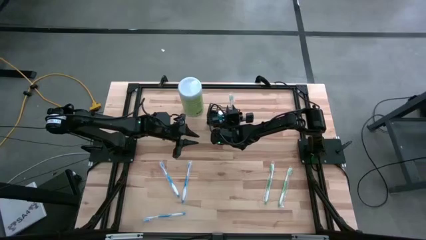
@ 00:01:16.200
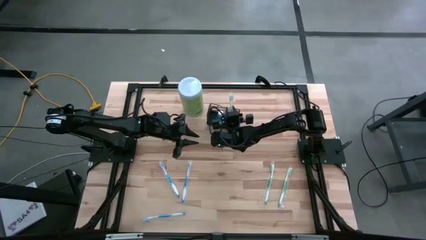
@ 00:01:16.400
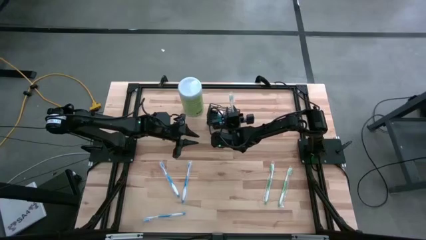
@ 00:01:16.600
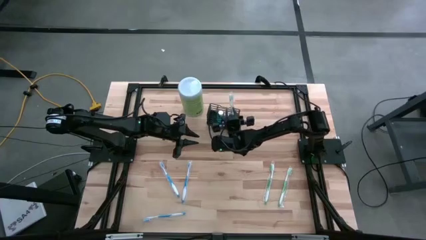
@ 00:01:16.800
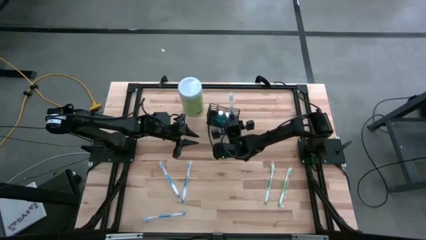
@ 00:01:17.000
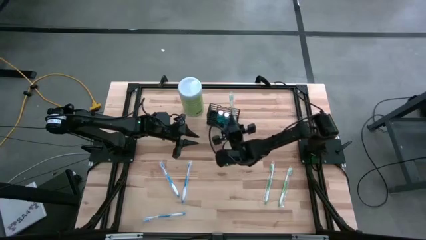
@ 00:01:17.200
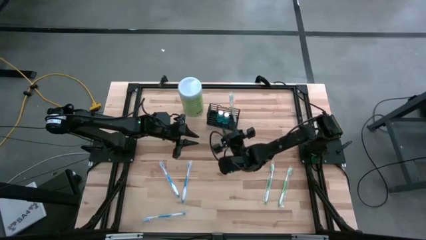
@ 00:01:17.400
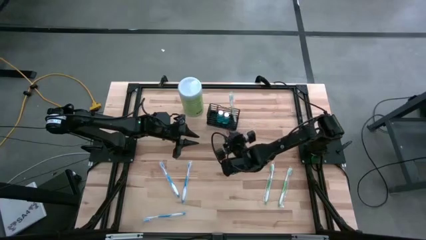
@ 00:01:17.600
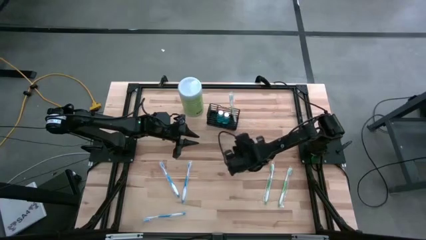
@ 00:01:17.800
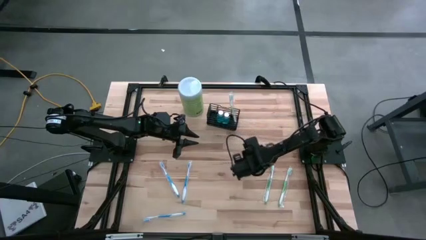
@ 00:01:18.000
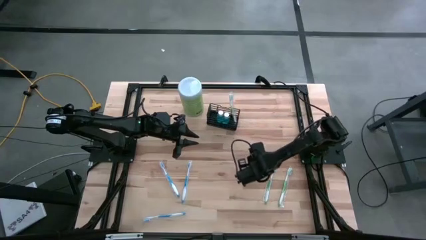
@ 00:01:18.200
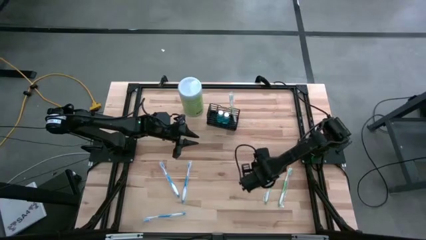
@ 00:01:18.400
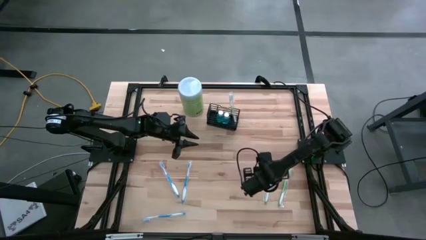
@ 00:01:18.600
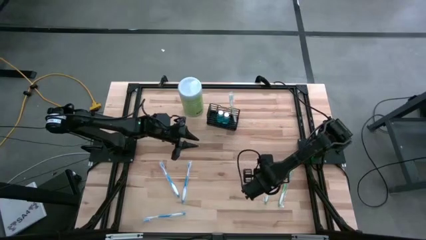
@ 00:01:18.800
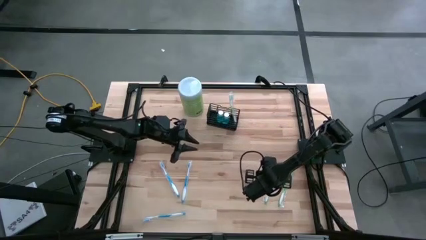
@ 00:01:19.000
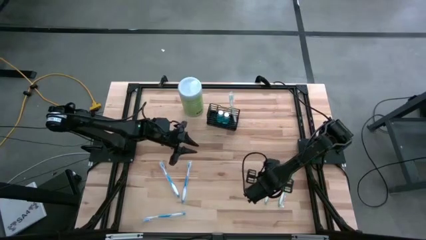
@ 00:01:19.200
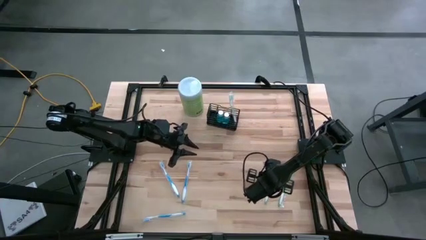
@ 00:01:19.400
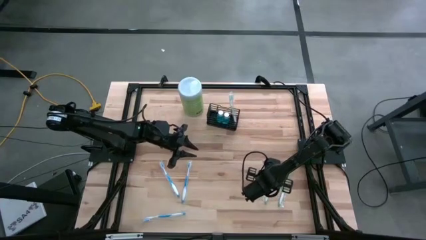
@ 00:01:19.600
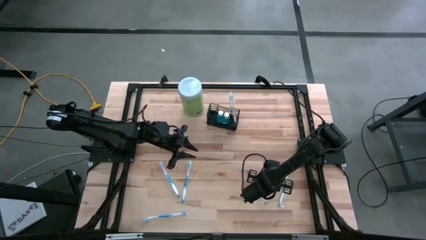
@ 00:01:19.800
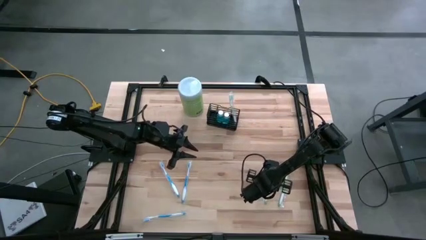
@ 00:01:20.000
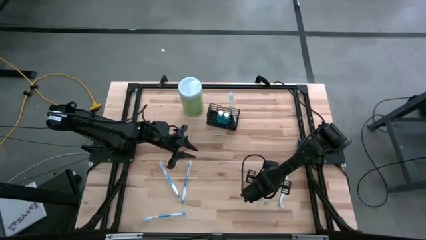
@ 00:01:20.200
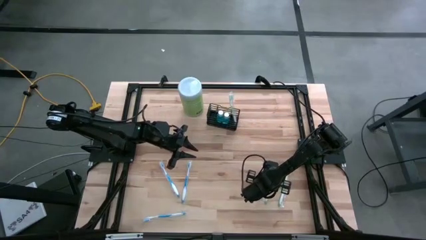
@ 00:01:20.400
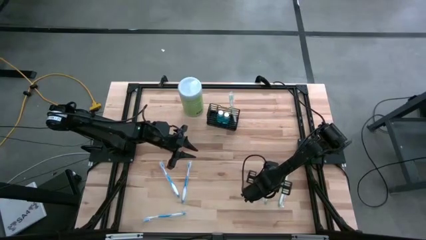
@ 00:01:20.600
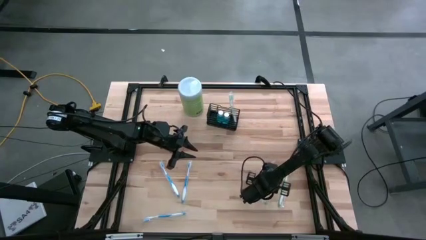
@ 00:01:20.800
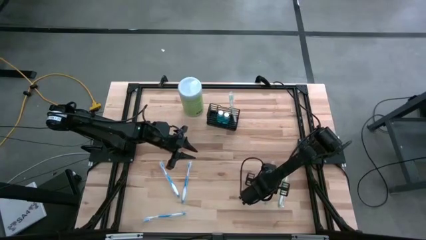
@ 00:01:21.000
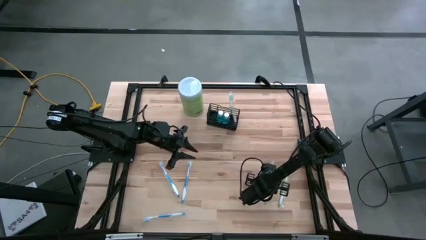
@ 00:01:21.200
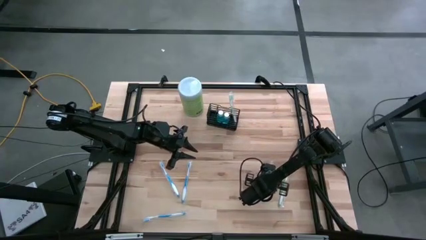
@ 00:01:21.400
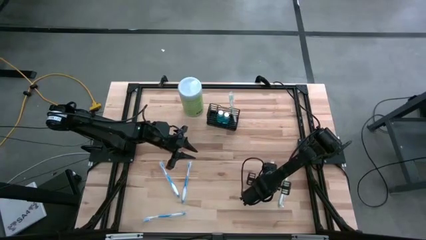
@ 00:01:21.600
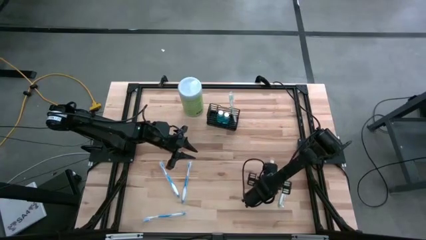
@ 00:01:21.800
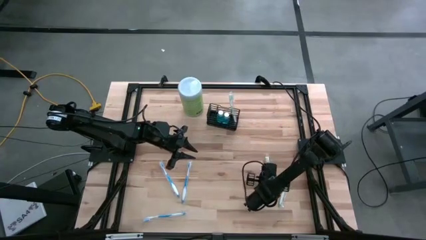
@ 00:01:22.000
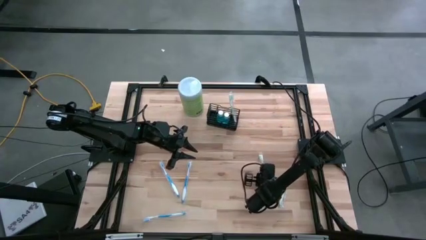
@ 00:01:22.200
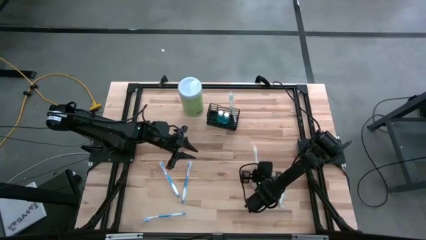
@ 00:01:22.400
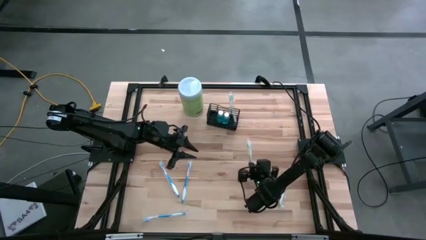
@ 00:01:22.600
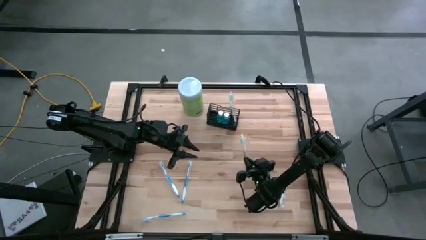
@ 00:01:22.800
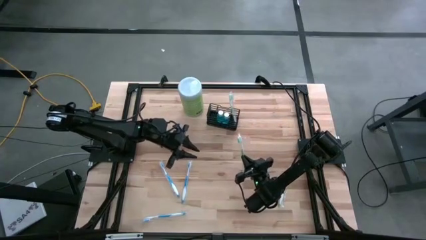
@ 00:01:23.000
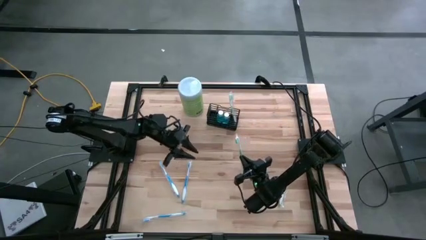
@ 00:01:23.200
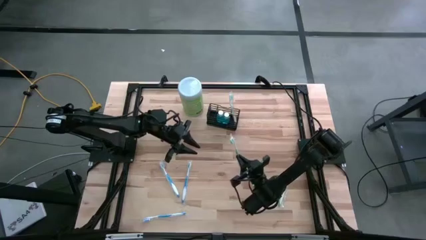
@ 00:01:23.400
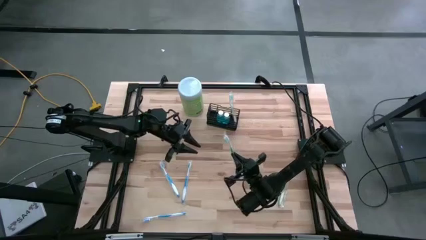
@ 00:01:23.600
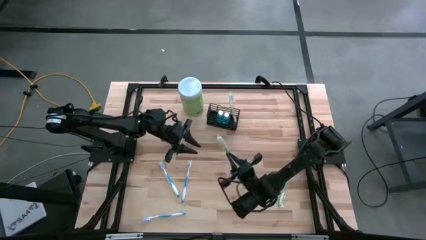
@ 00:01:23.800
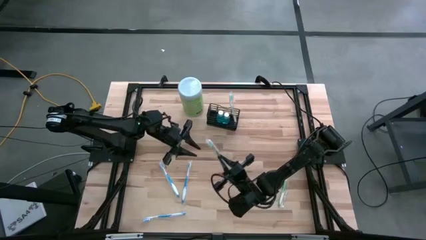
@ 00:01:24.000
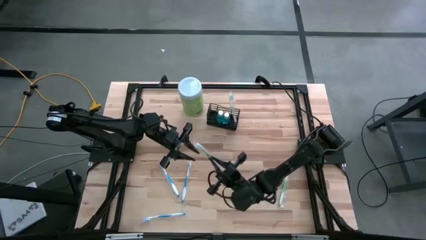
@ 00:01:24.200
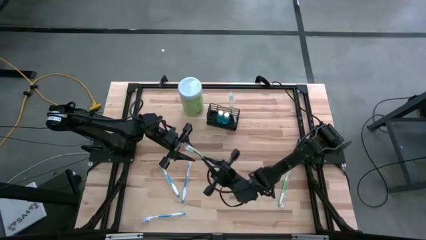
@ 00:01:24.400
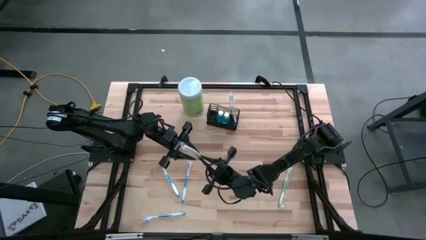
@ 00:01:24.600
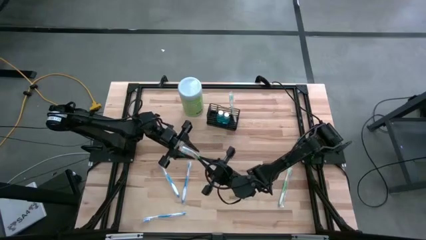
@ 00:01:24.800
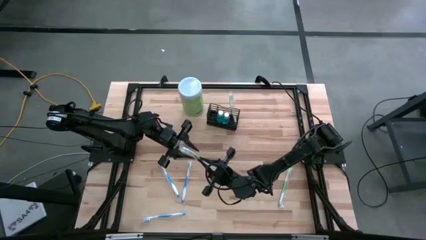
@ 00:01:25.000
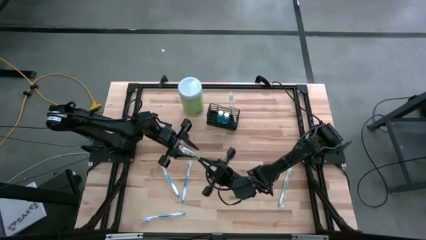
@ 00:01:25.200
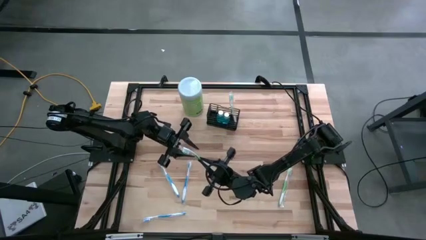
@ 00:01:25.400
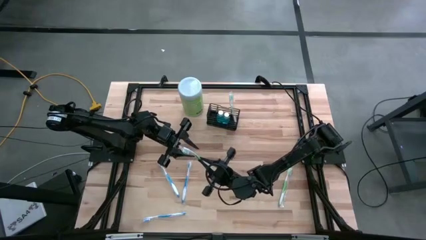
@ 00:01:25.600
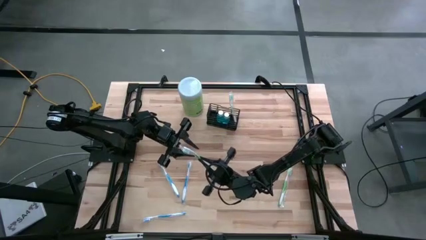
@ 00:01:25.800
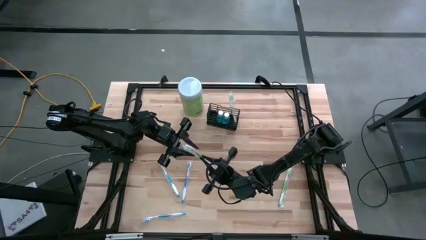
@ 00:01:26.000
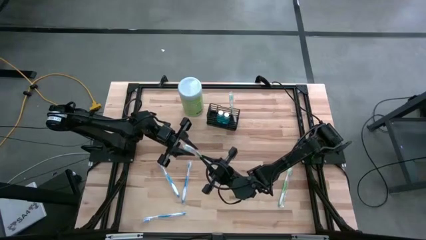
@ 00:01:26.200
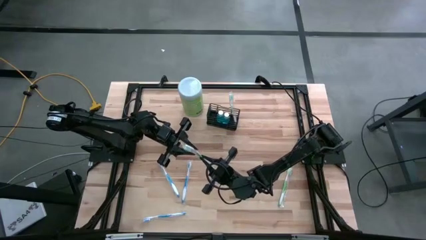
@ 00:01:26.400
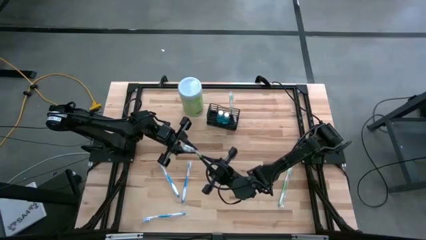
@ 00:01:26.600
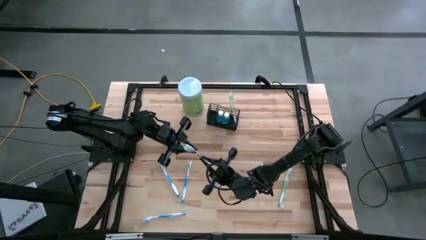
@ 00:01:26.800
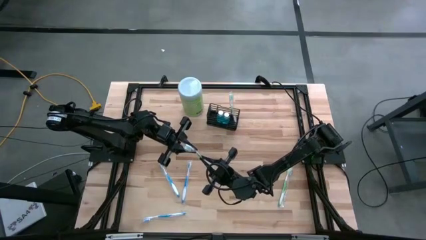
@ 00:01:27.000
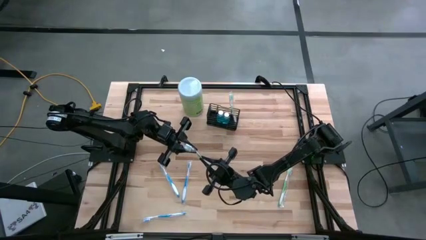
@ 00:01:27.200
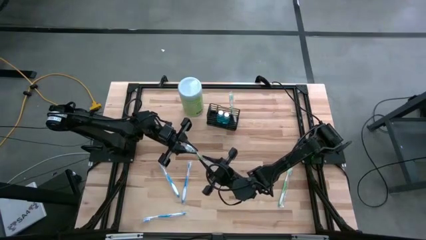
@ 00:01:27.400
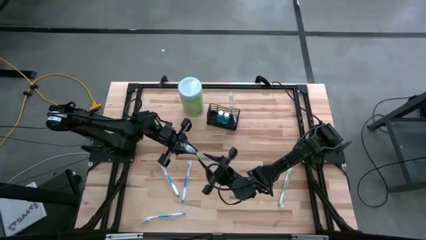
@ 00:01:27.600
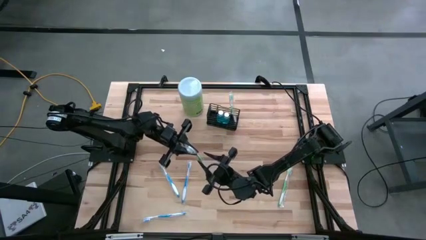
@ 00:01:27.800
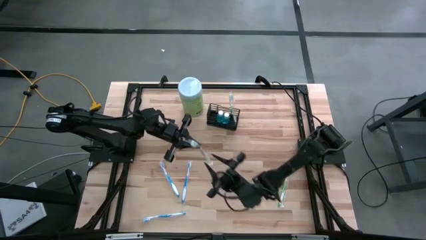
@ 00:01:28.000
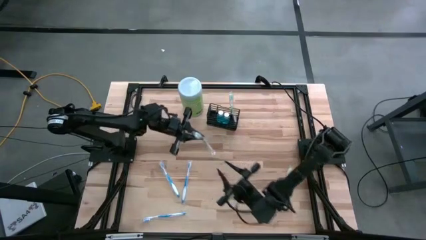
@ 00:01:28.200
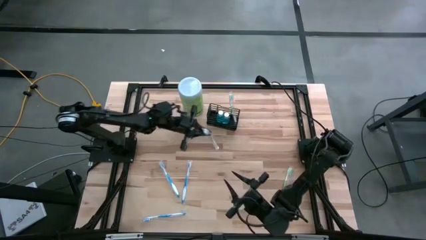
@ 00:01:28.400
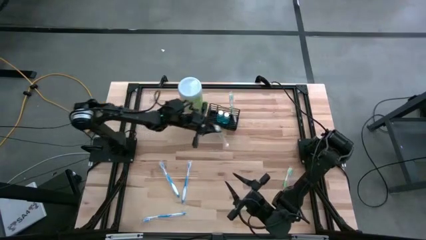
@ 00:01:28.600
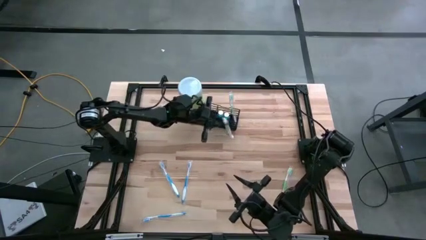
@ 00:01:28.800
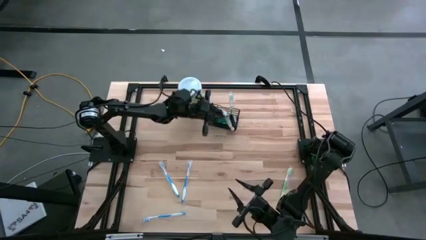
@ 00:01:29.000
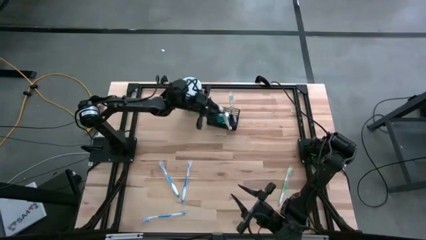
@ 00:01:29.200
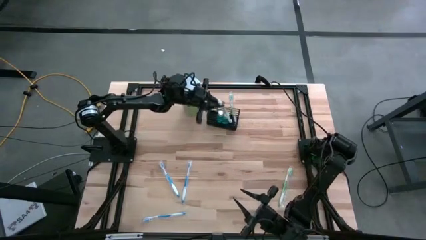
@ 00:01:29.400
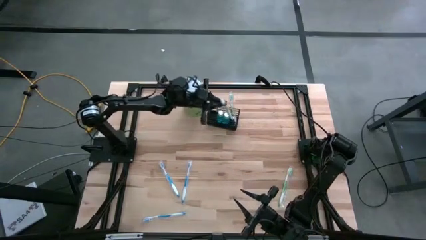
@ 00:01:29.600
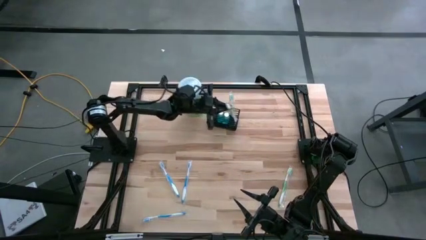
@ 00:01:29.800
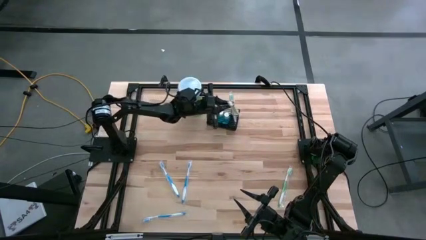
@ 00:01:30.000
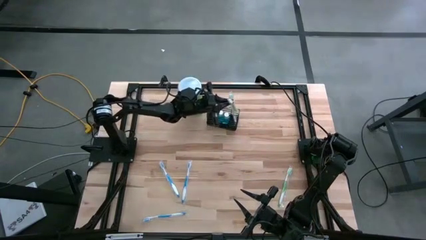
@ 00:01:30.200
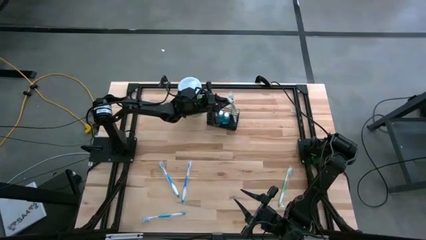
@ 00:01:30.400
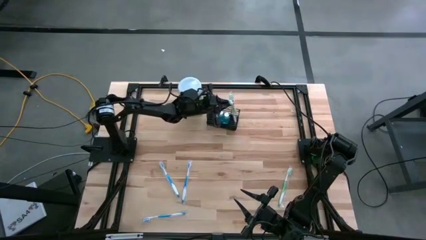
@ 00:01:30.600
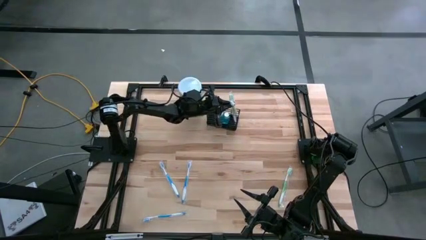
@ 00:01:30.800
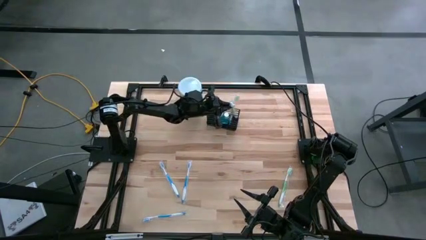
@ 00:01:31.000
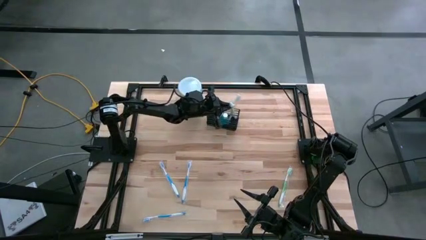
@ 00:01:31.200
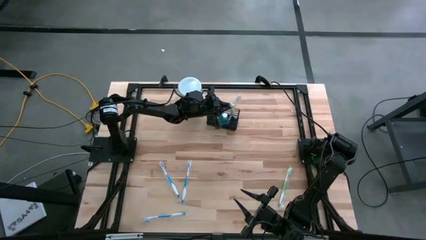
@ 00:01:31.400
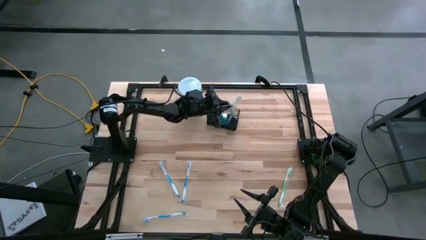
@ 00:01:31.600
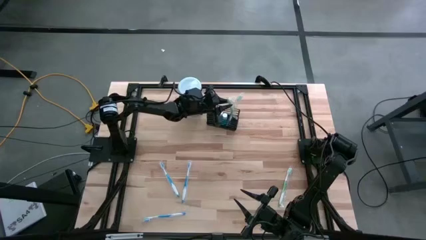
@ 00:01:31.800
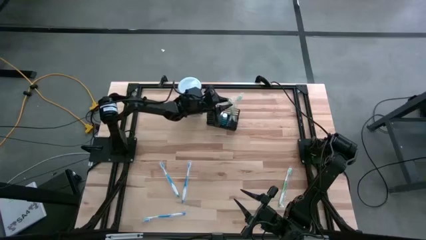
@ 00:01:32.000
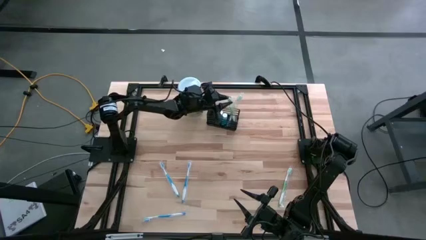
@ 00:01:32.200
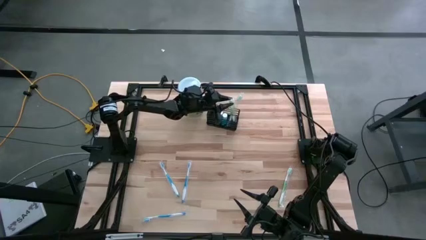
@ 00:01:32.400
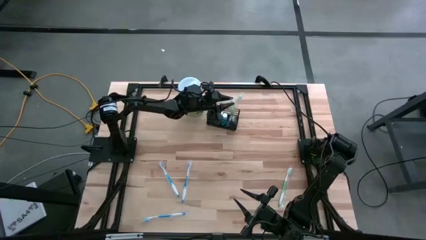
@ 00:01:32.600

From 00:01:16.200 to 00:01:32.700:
Task: Pick & Place toothbrushing station
Put the left green toothbrush into the mesh organizer

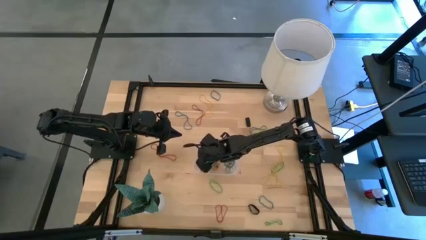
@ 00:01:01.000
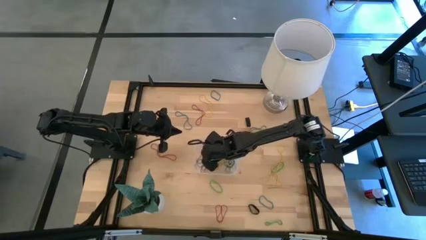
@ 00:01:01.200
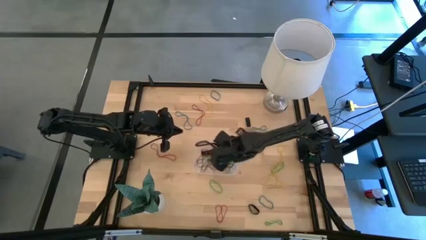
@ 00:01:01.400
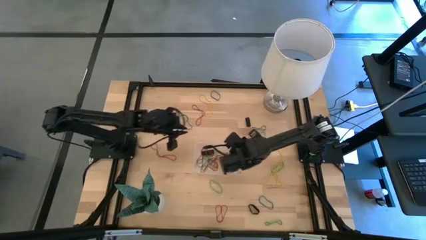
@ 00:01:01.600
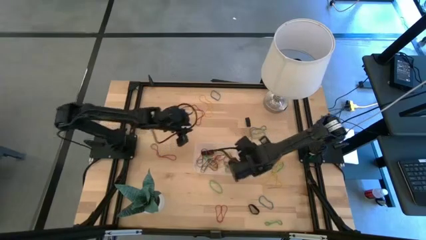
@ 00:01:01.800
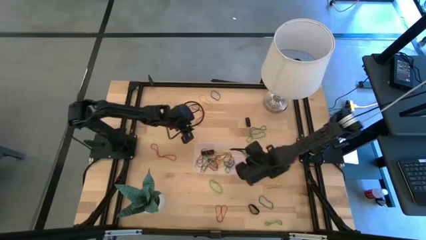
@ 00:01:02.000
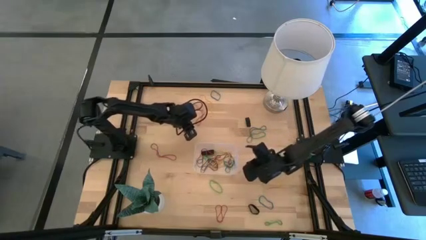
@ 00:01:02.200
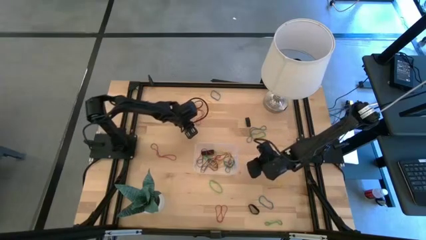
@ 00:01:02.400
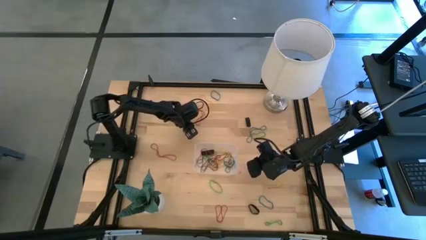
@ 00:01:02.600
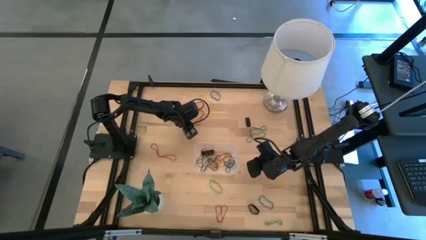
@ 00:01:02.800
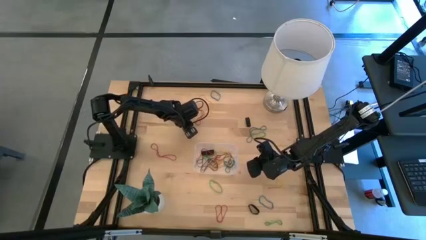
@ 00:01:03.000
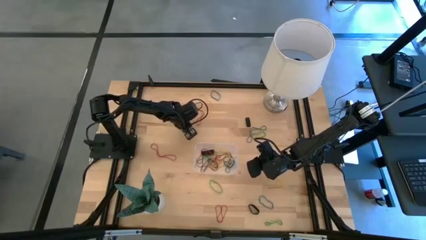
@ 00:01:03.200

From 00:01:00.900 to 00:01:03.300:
Task: Pick and place rubber bands into bin
Put the blue rubber band into the transparent bin
